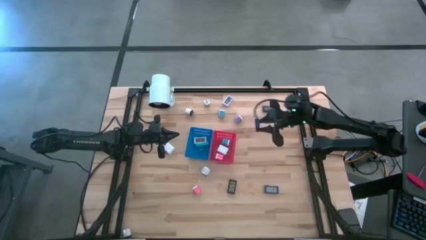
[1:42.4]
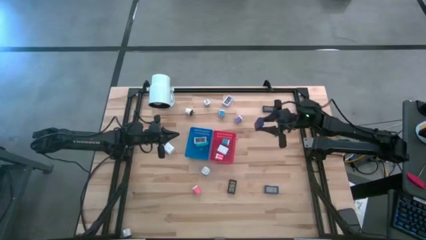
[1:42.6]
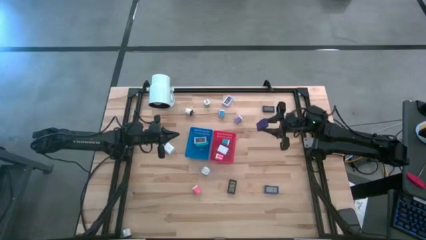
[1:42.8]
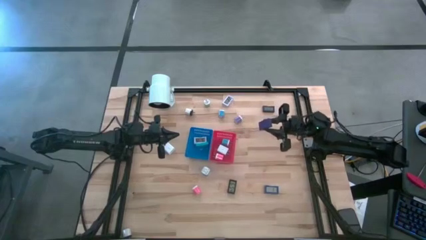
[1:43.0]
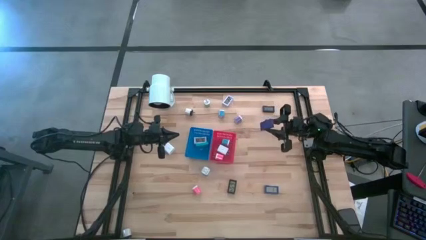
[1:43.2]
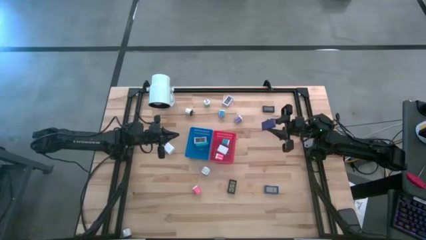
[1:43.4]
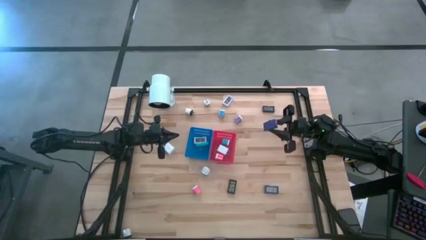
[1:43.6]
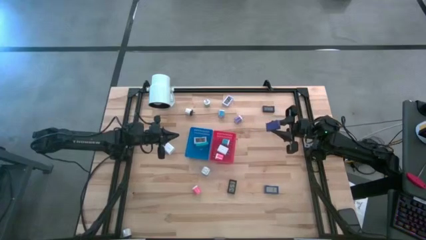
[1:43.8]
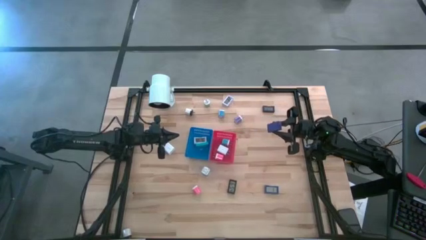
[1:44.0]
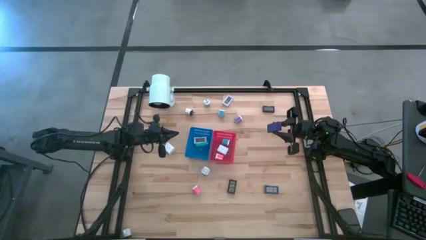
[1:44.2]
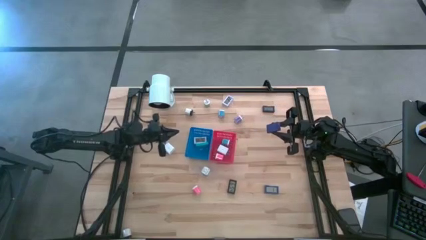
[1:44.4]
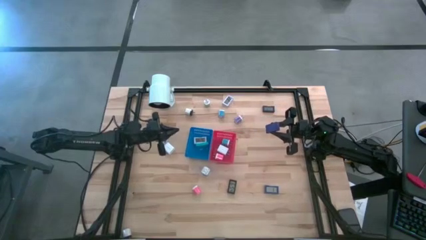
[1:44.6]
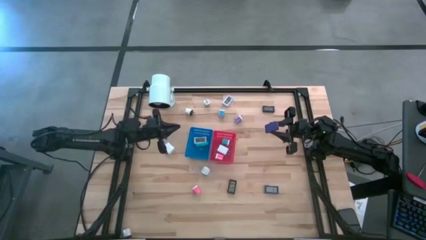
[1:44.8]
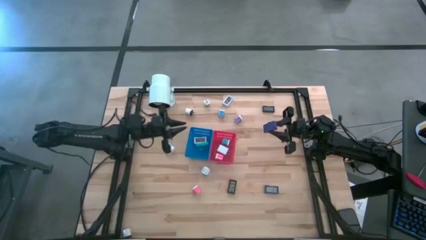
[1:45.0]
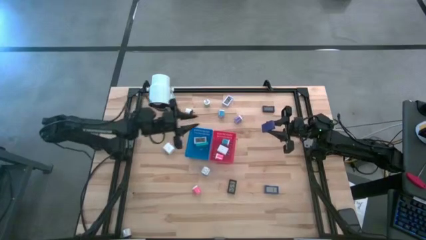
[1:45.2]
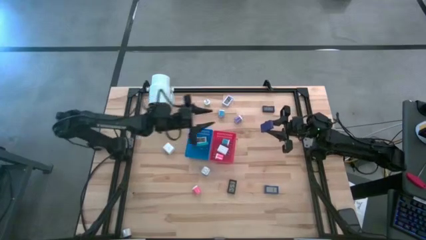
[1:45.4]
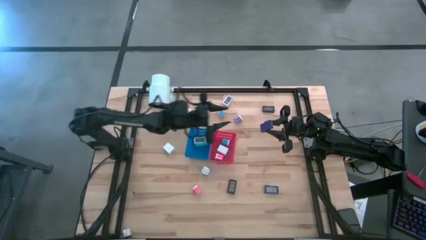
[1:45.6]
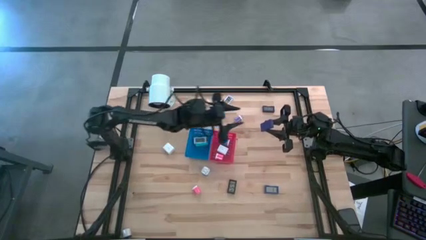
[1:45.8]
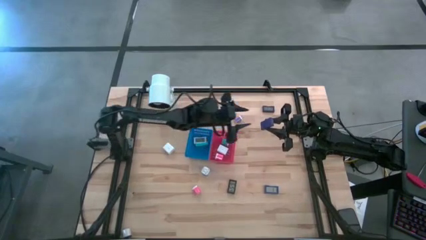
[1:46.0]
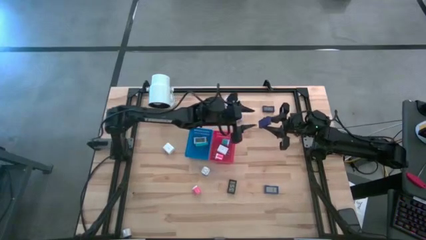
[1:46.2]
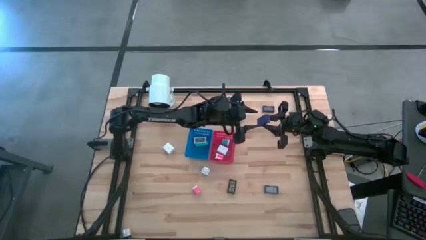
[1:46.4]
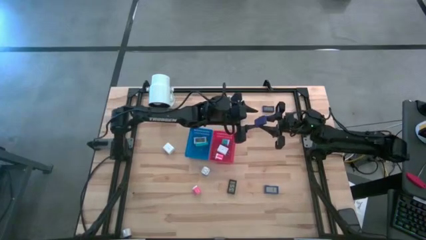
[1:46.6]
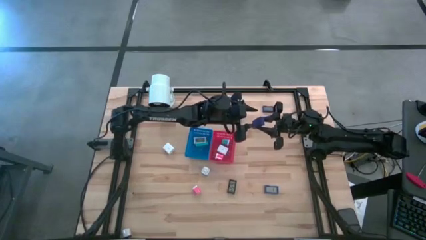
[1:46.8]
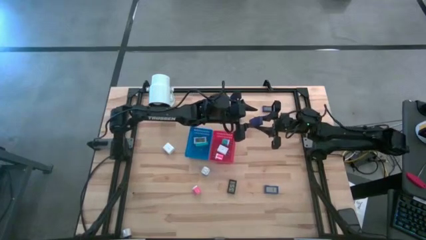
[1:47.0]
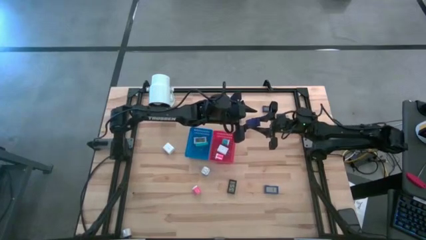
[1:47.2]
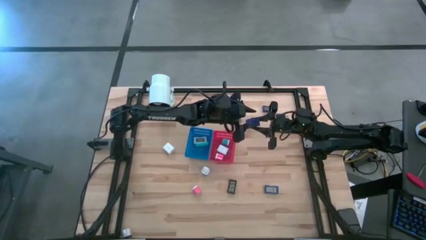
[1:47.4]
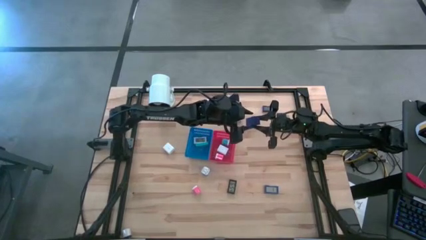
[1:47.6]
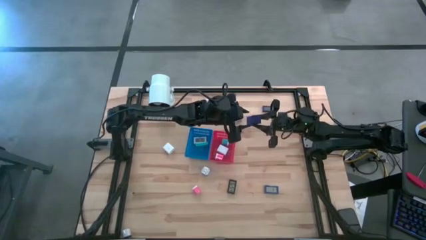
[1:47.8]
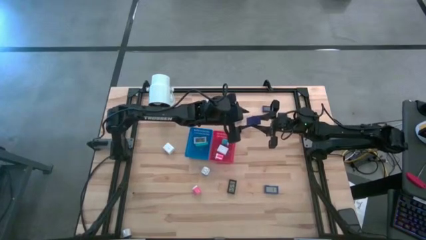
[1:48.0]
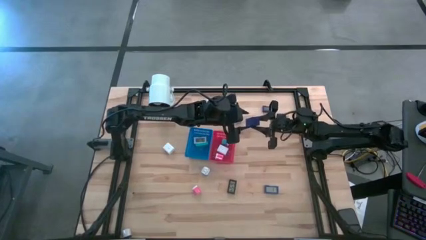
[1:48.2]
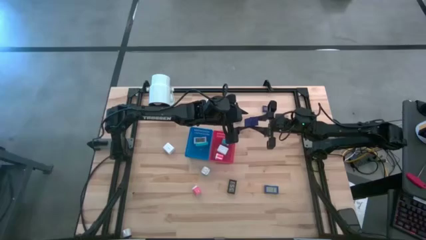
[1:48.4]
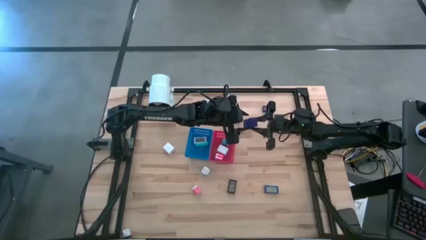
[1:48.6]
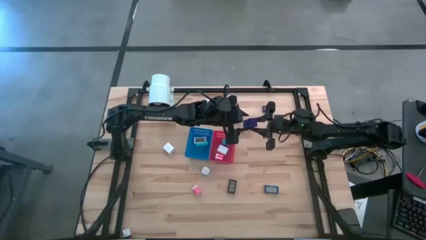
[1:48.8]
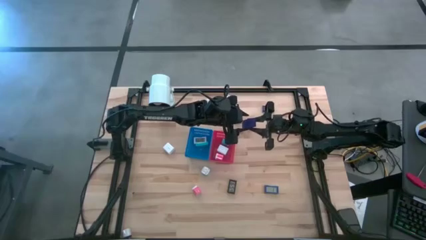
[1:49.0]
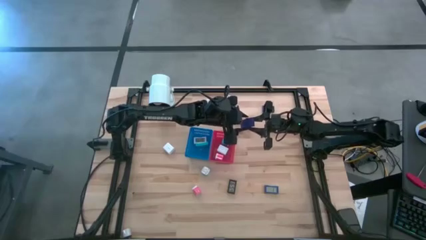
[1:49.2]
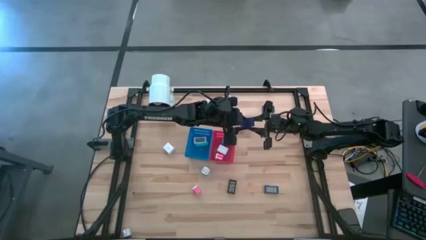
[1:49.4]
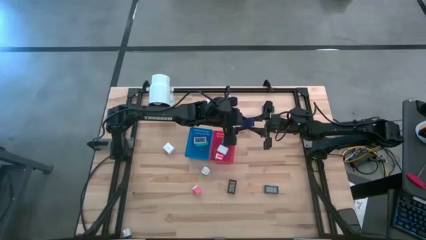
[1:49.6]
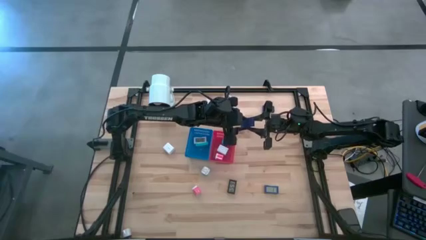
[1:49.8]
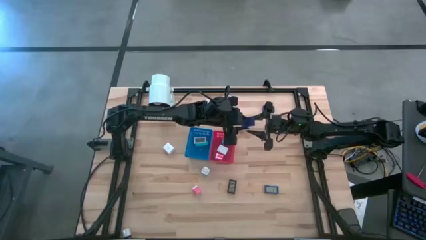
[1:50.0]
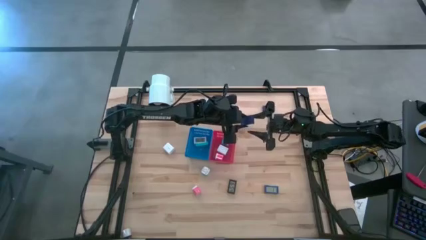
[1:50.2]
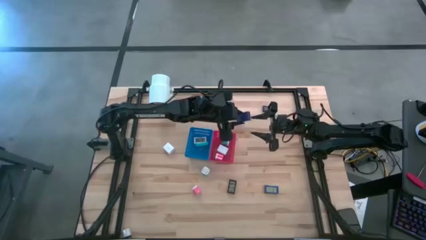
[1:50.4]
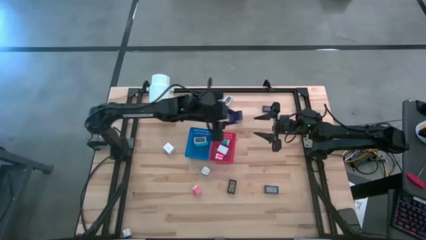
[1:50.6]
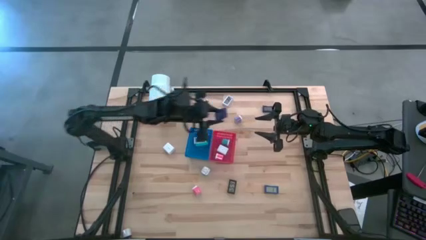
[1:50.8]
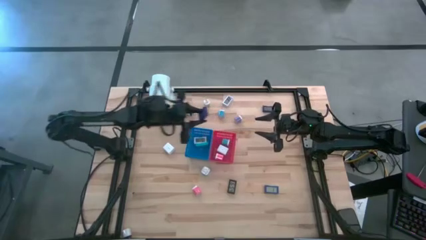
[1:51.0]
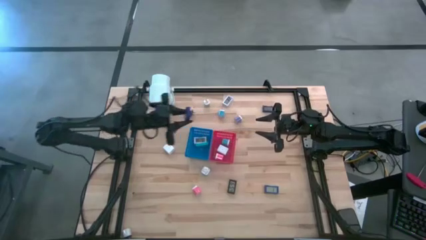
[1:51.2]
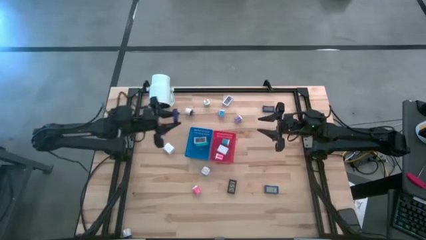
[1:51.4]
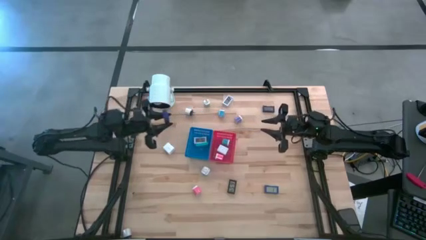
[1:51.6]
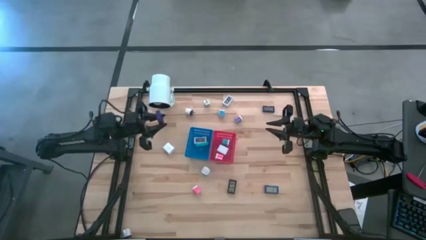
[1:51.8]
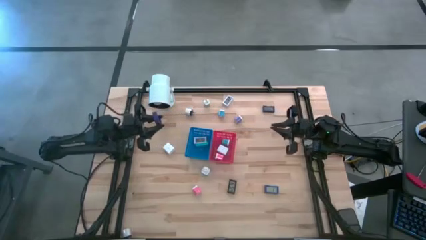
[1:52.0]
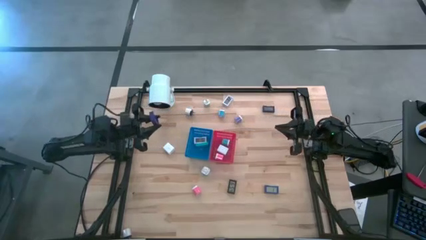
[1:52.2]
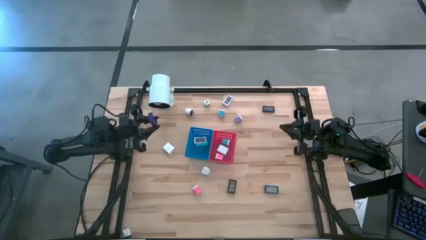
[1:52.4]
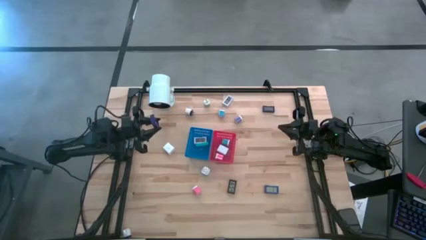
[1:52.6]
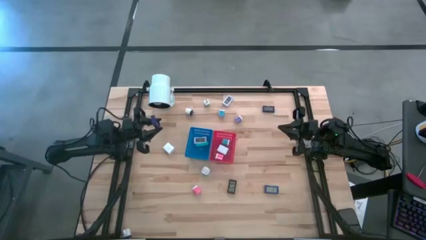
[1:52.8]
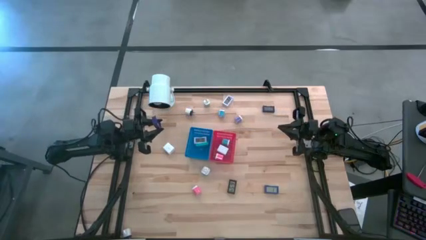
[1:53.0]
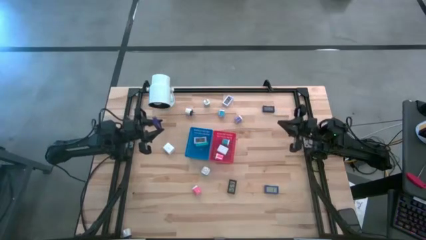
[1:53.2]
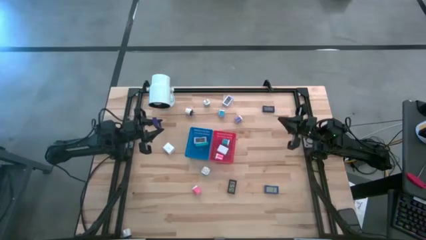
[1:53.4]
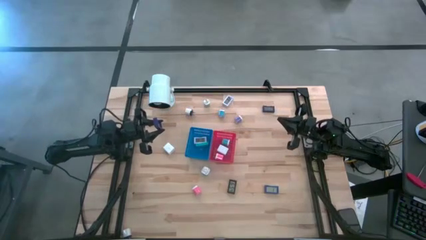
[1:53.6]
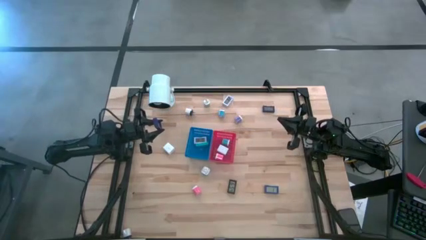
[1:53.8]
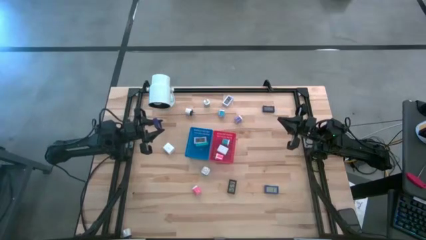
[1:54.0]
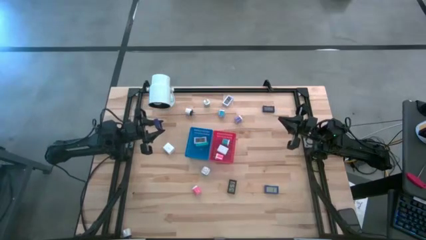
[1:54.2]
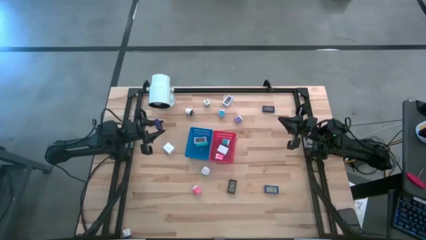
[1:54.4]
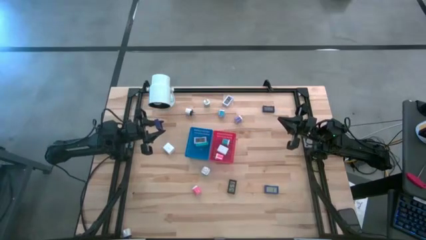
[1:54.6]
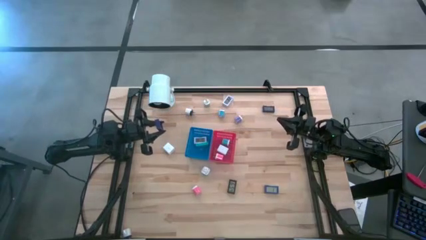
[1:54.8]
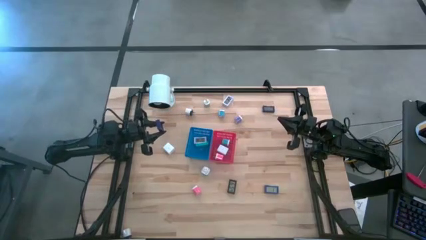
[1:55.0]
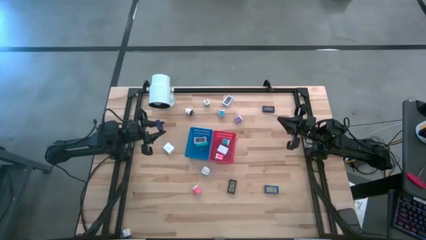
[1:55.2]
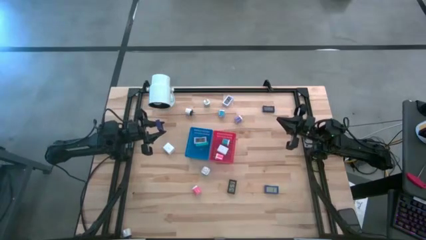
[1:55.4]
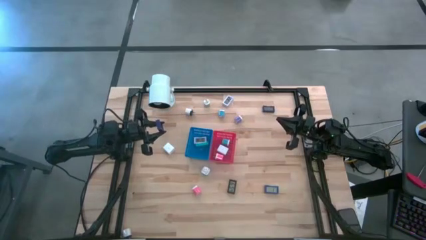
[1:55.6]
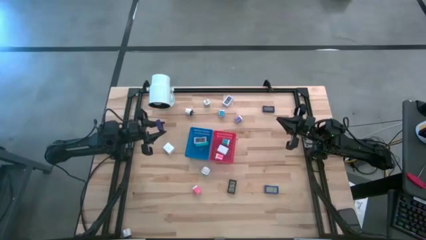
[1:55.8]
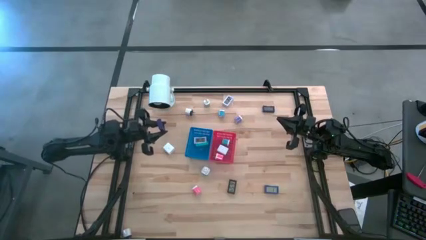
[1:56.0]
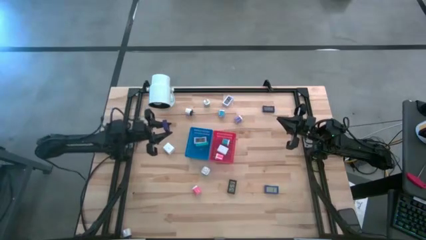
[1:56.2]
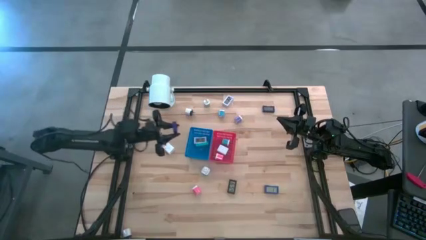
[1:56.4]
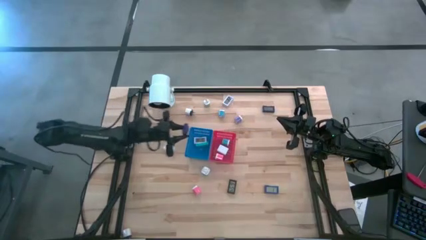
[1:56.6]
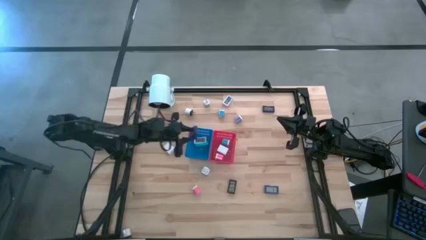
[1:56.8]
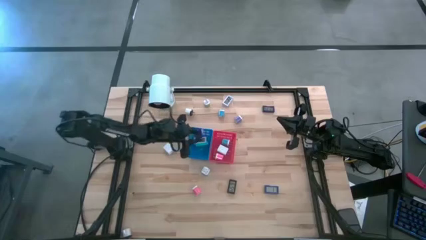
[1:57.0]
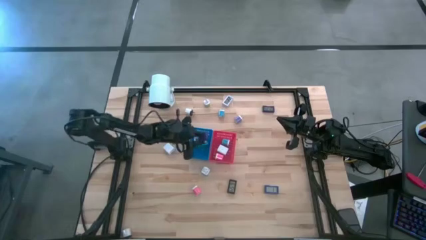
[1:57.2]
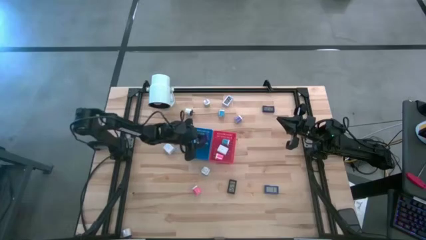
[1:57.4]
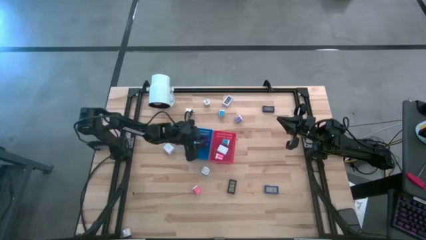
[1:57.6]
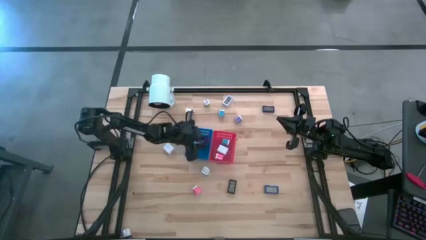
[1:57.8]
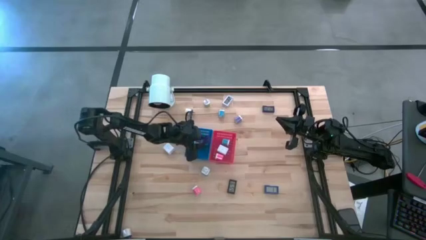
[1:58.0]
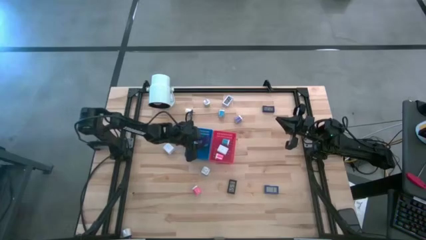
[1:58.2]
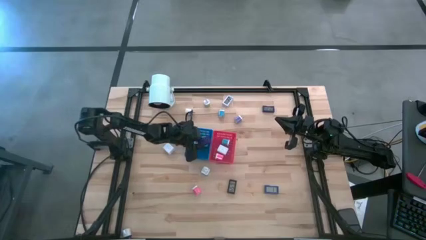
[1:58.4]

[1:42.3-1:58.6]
Task: Pick & Place Office items
Put the dark blue digital clock into the blue bin
